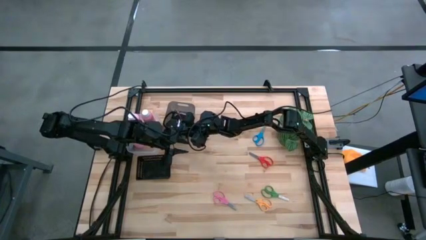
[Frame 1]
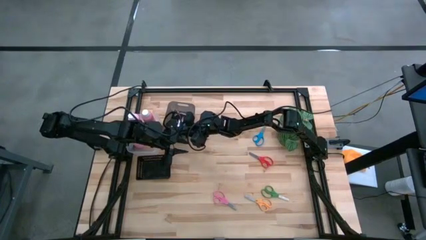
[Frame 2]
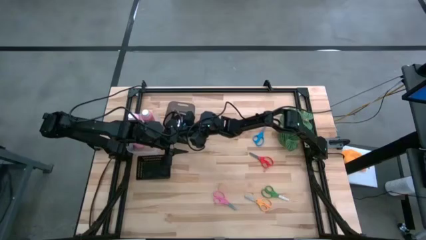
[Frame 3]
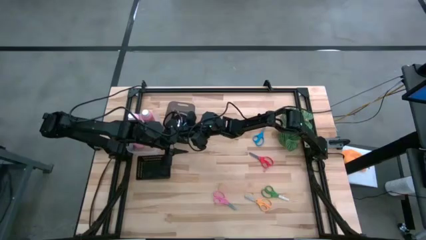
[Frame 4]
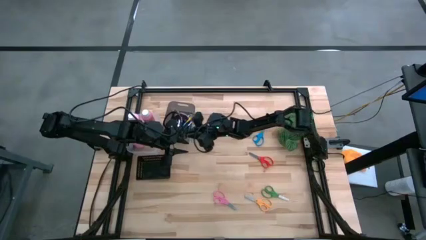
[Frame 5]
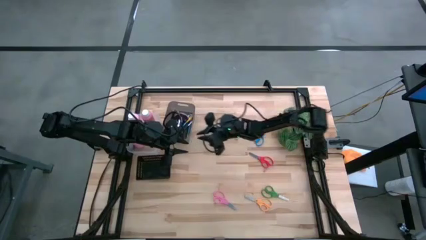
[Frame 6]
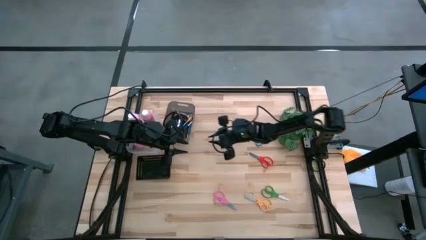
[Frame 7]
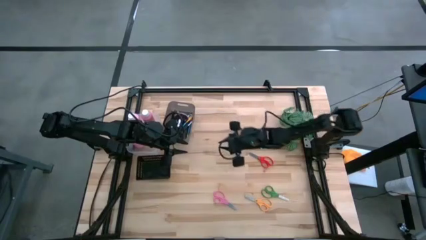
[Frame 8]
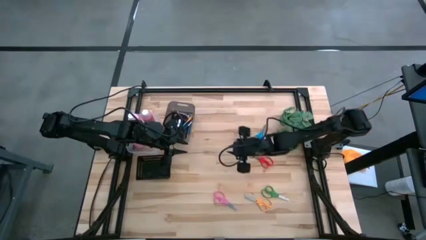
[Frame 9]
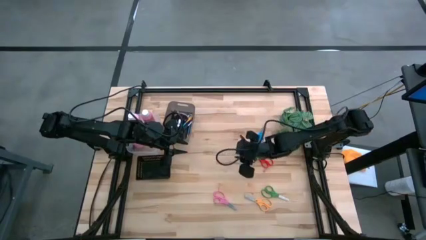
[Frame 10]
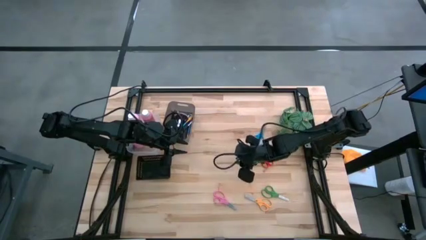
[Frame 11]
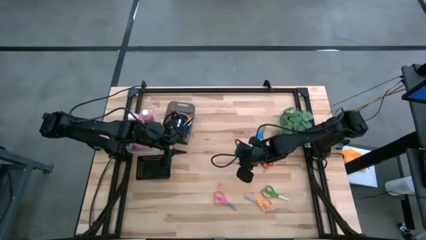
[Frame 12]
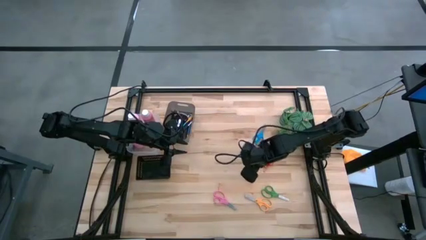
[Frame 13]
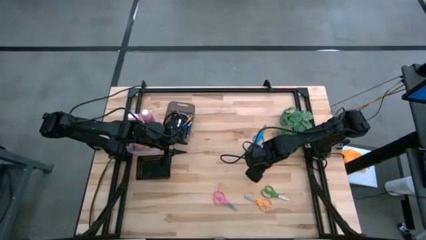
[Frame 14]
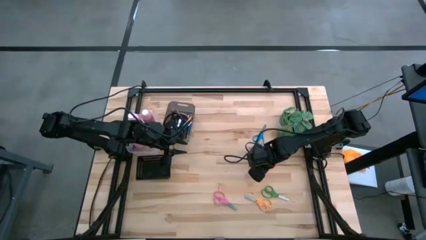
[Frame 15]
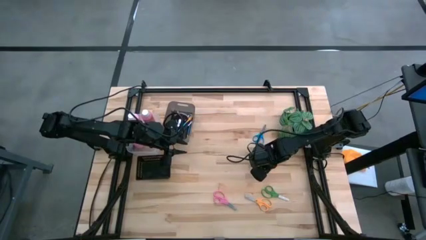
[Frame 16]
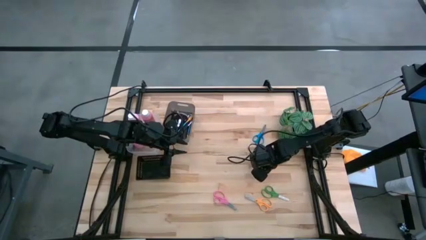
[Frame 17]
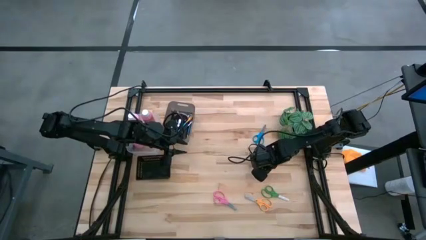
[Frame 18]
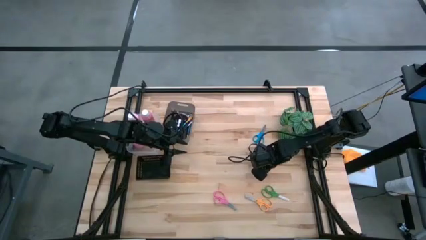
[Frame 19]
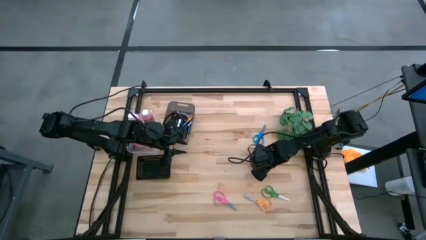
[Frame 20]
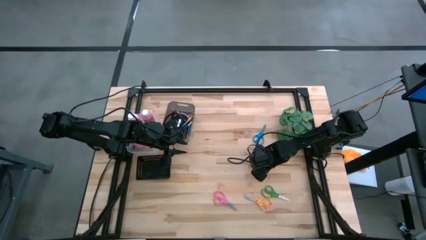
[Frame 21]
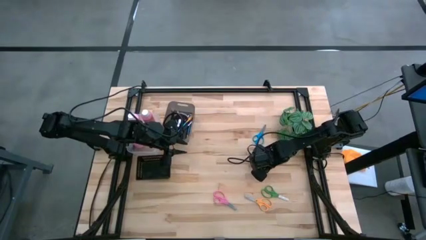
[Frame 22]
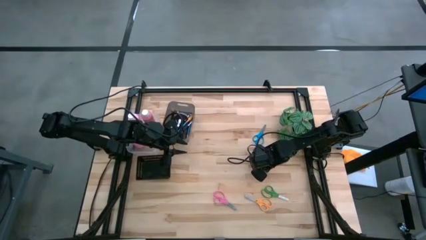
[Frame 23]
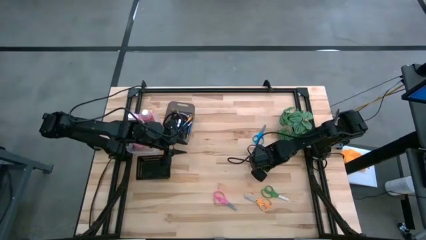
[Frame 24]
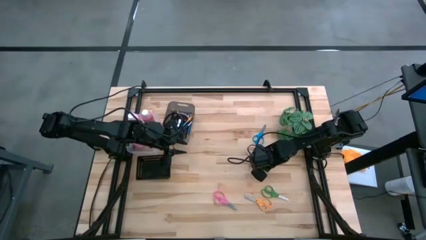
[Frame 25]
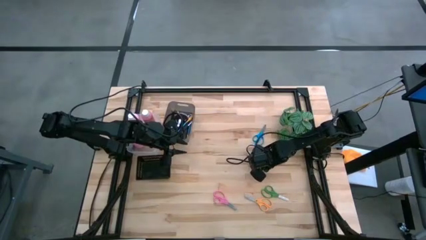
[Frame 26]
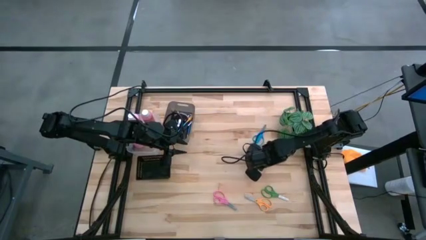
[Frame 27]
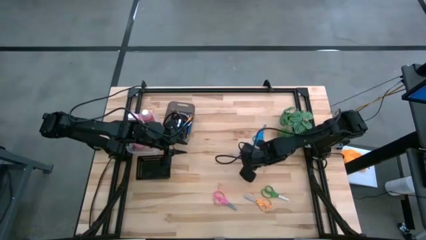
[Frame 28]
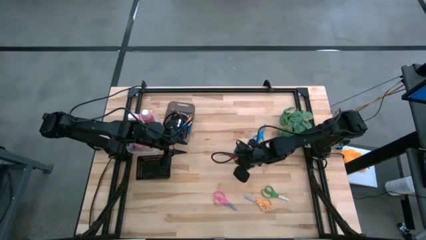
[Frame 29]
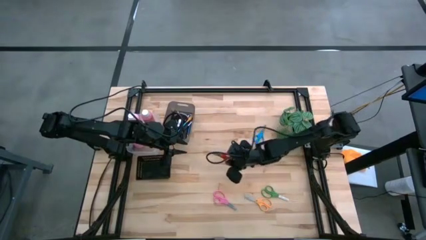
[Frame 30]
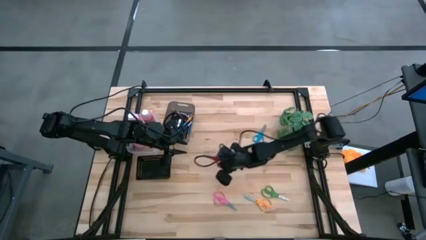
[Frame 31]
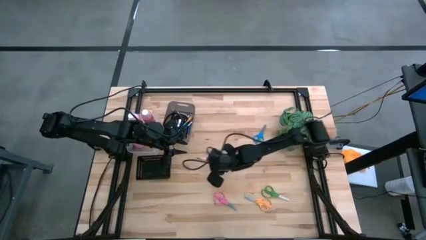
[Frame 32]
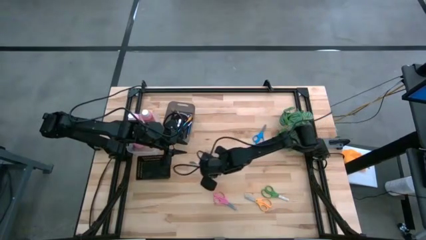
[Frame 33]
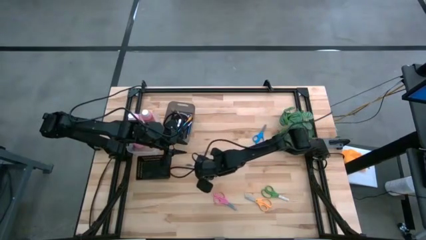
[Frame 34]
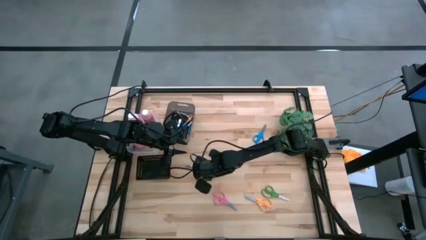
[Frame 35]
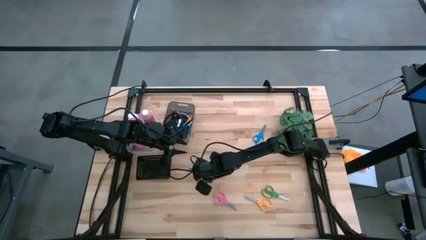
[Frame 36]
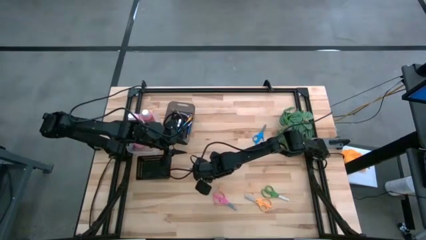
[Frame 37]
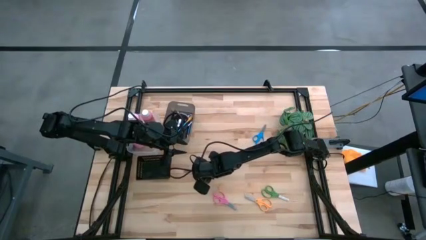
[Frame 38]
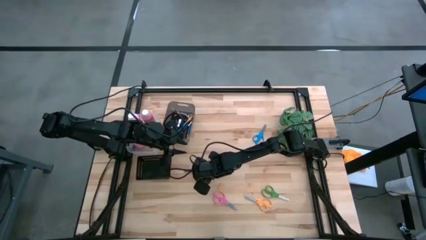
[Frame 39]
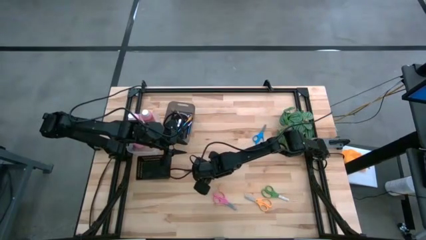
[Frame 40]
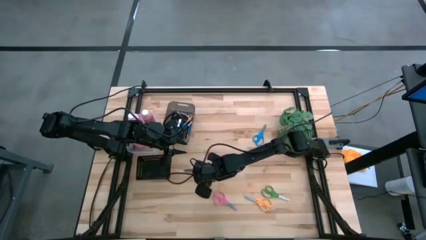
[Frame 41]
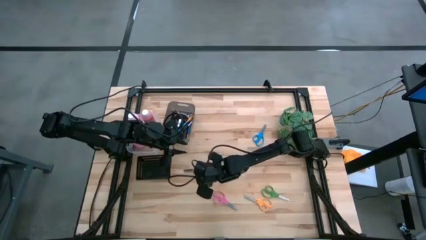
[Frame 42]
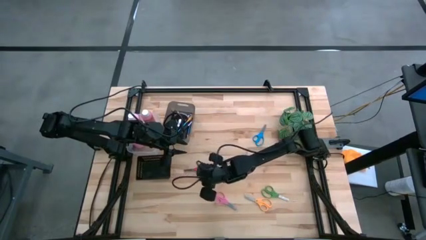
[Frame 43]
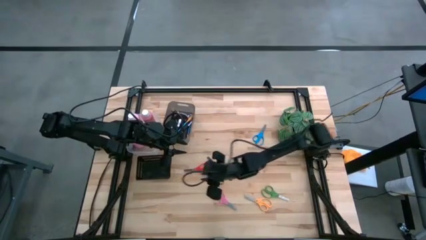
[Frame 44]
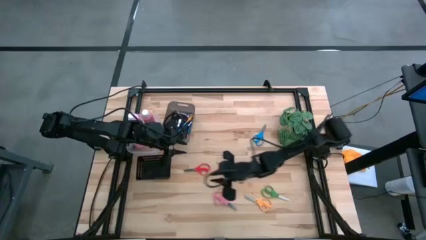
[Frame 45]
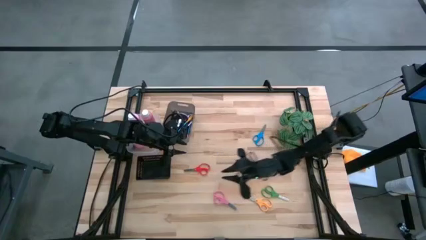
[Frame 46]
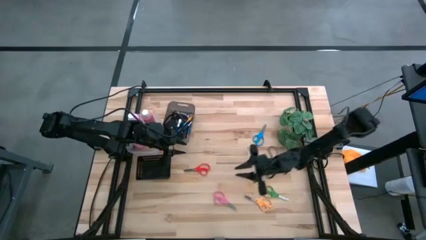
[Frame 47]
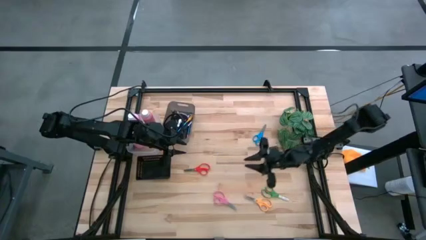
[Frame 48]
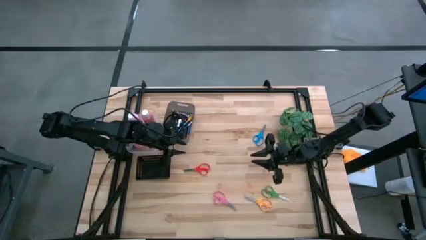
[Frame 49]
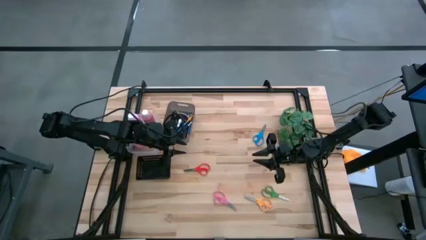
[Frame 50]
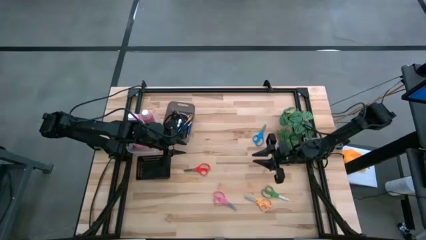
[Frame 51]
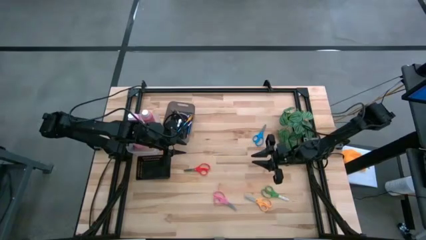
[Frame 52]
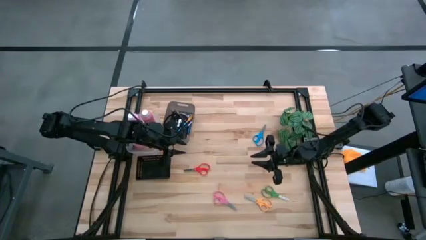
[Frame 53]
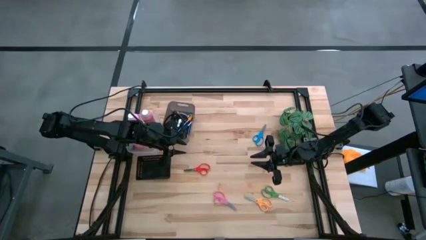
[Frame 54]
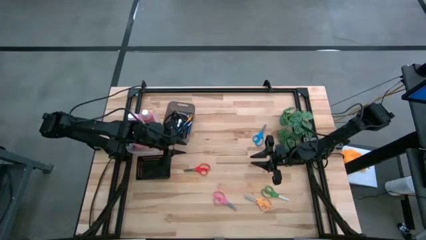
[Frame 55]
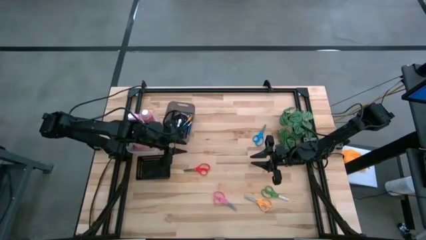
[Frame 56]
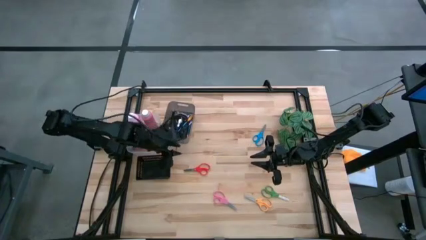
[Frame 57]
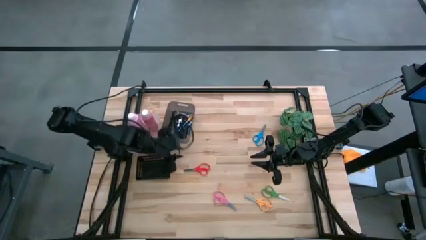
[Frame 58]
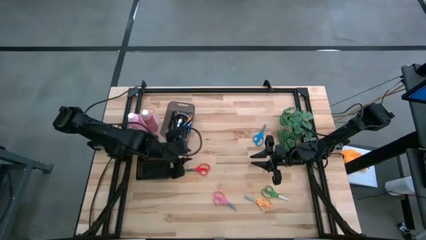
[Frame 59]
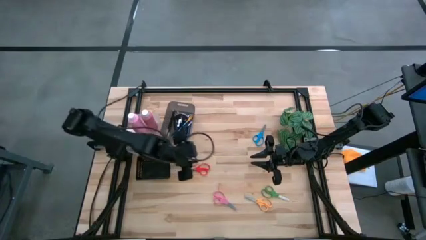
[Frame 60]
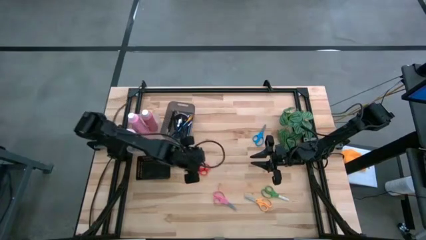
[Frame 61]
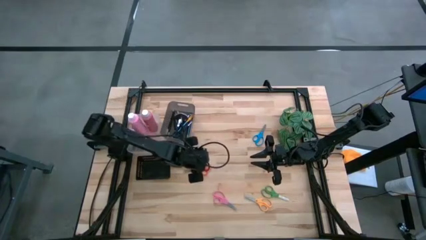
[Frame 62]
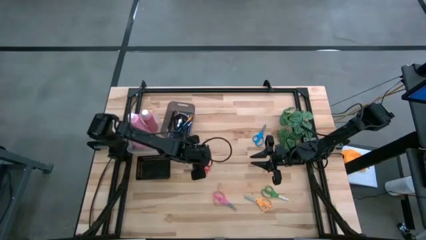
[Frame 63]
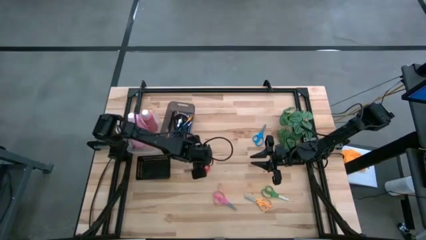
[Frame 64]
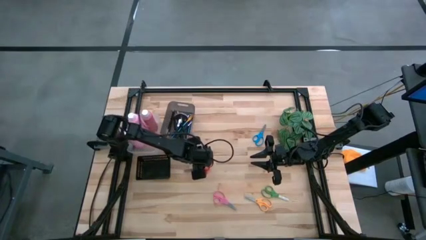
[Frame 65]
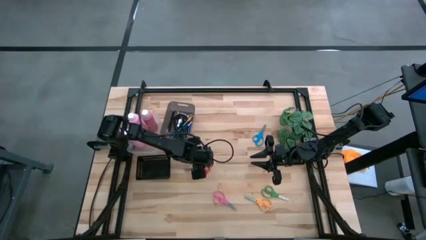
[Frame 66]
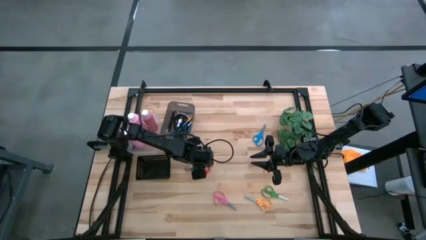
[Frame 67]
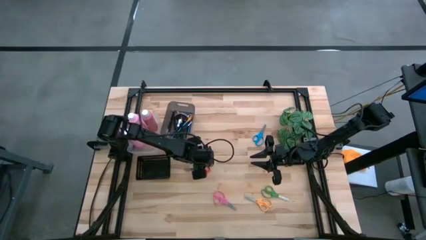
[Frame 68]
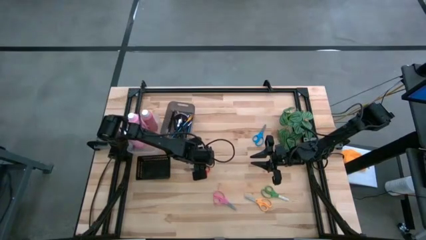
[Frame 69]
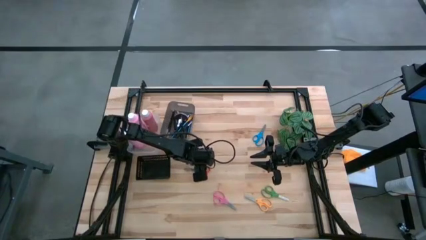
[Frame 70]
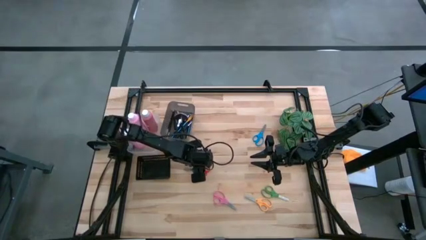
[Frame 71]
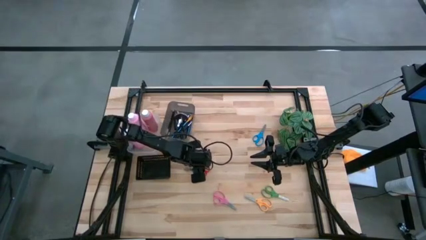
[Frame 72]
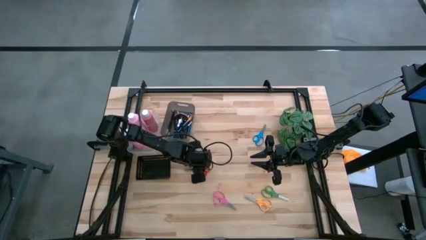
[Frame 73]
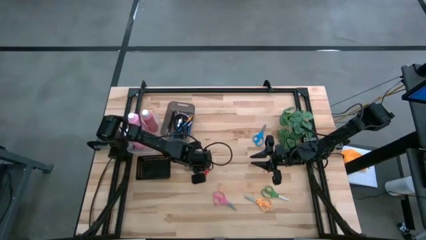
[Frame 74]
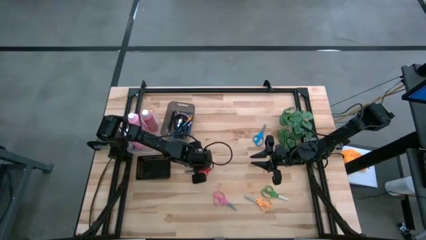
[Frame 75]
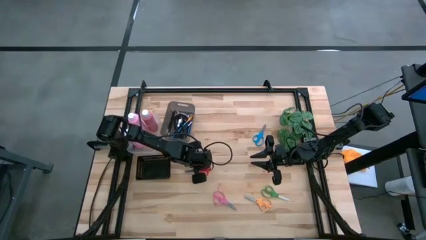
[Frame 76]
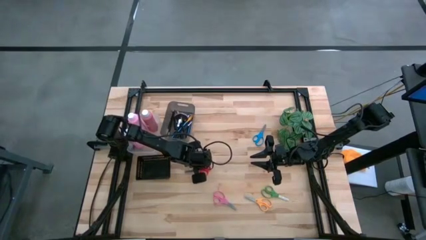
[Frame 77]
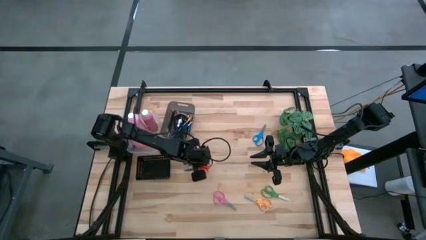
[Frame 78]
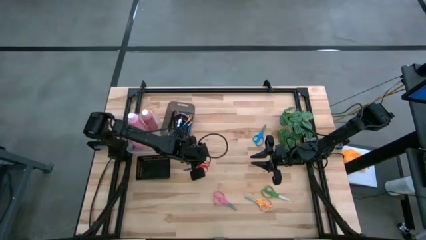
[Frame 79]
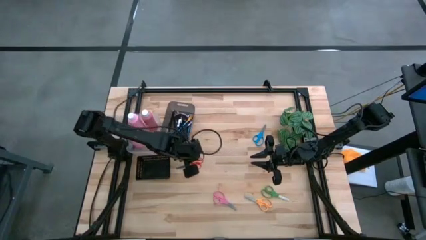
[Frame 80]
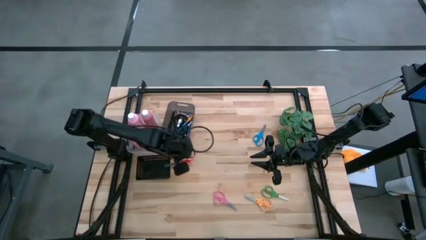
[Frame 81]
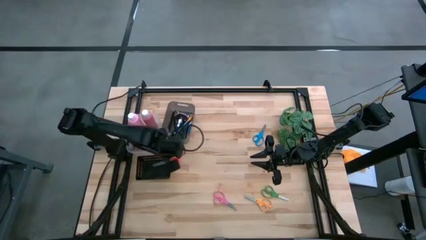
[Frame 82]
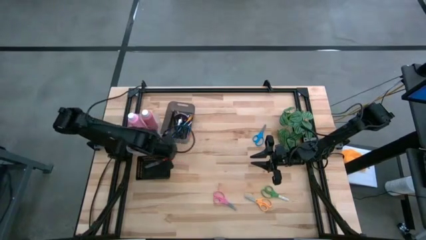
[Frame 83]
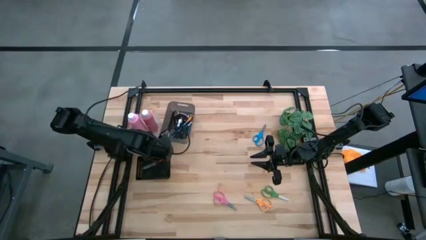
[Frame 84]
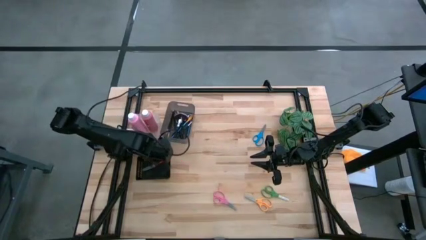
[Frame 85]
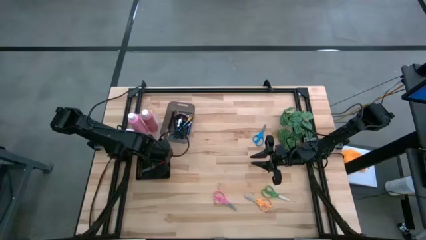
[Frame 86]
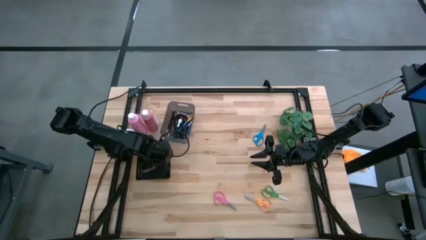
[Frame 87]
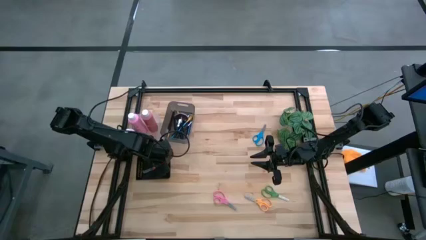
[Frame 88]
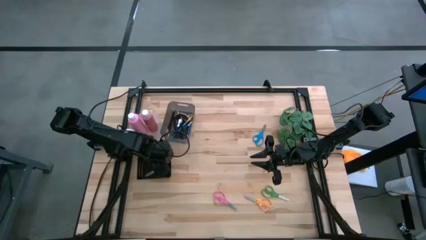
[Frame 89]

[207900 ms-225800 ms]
Task: Pick & Place Paint Supplies
Put the red scissors into the black basket
